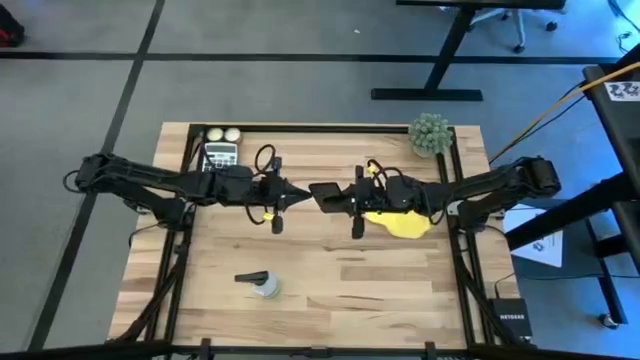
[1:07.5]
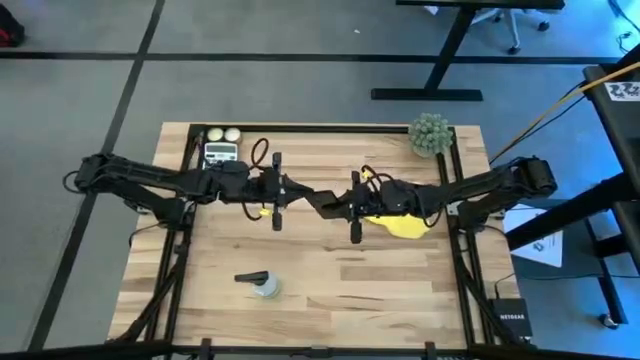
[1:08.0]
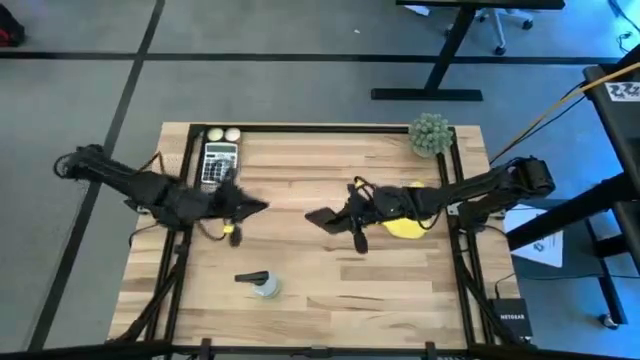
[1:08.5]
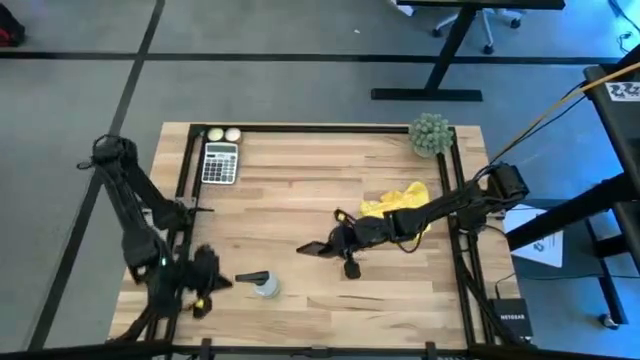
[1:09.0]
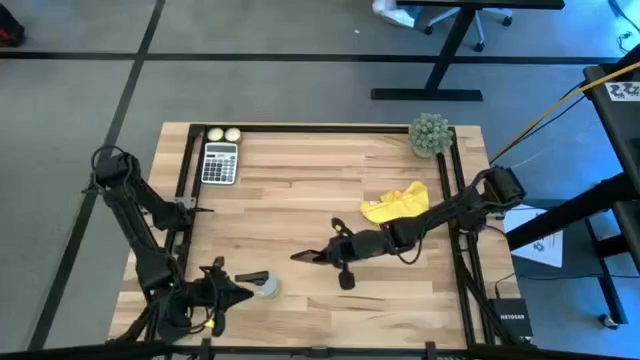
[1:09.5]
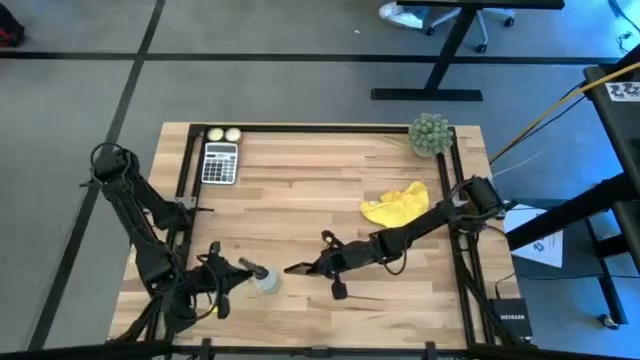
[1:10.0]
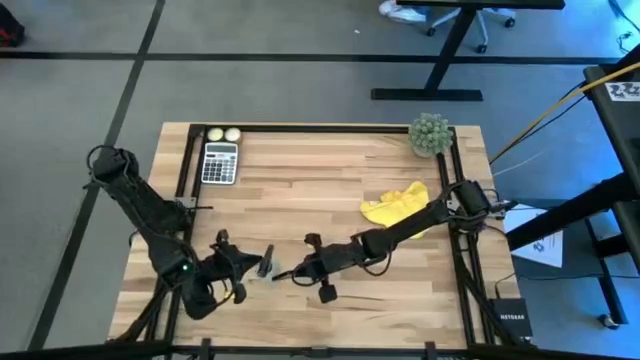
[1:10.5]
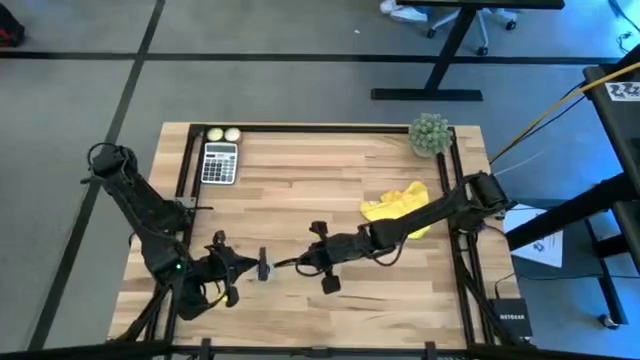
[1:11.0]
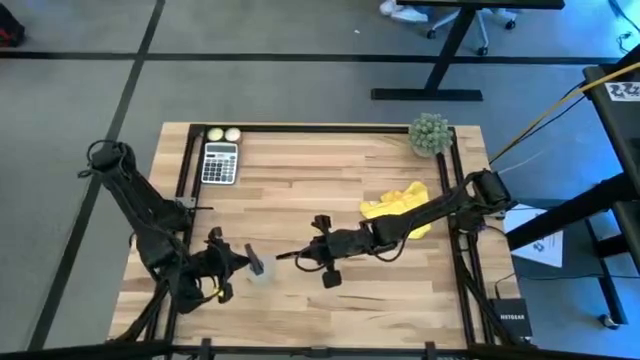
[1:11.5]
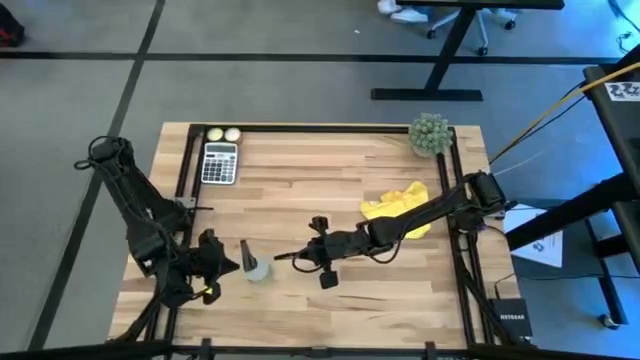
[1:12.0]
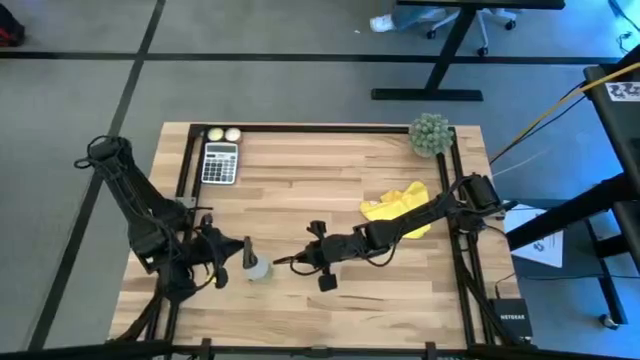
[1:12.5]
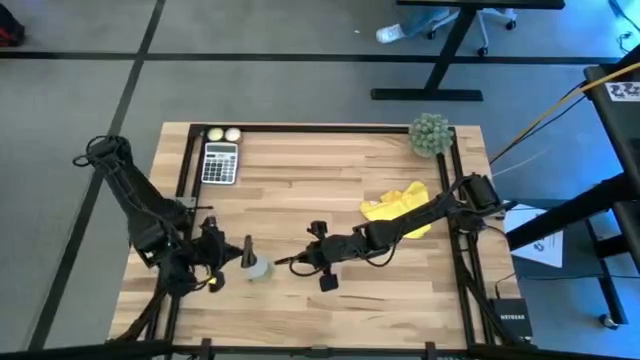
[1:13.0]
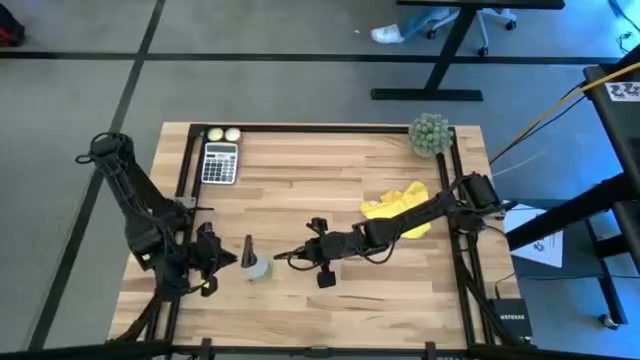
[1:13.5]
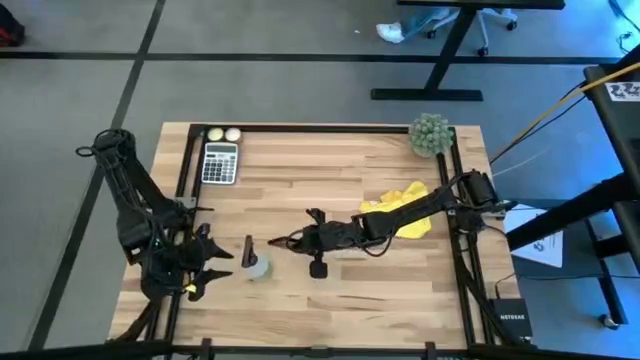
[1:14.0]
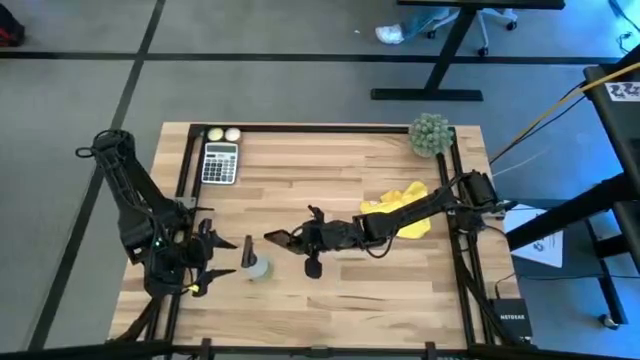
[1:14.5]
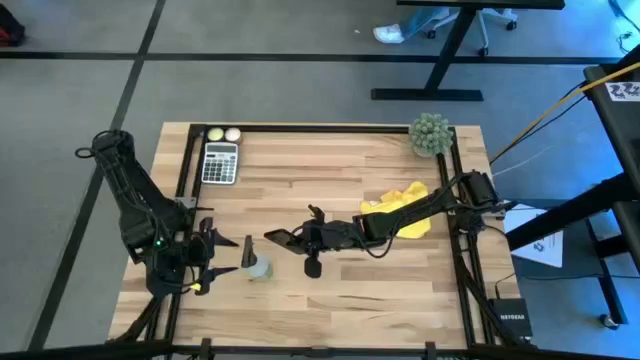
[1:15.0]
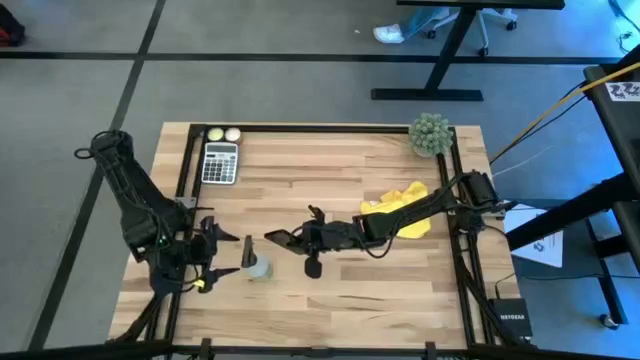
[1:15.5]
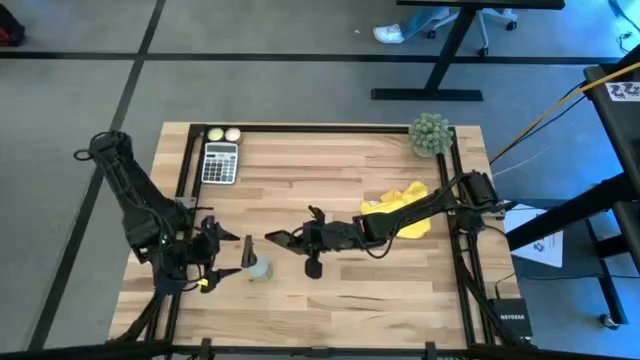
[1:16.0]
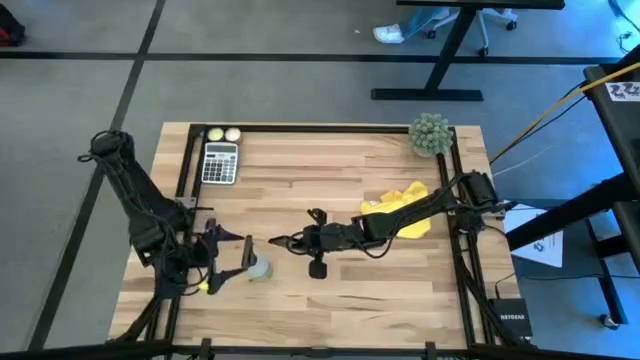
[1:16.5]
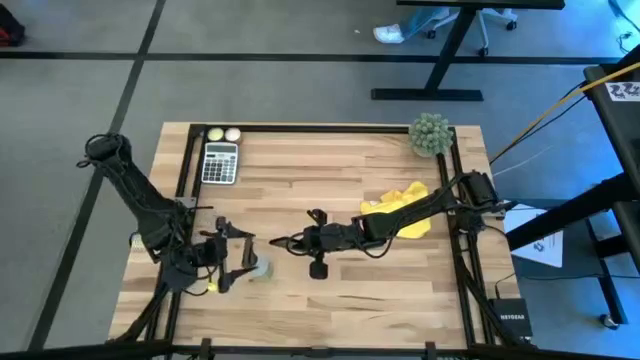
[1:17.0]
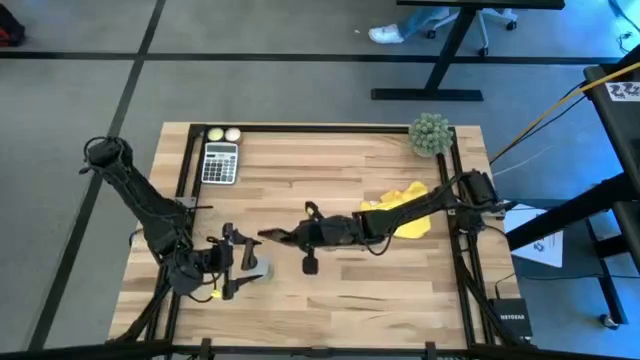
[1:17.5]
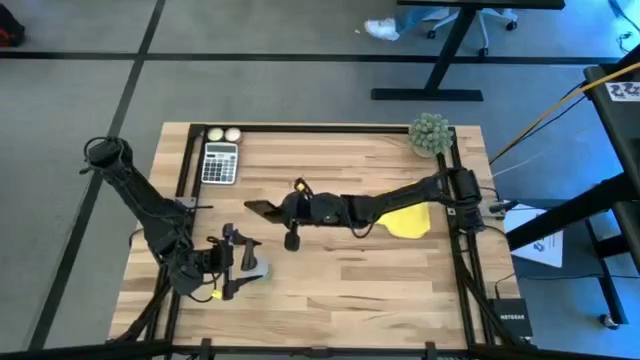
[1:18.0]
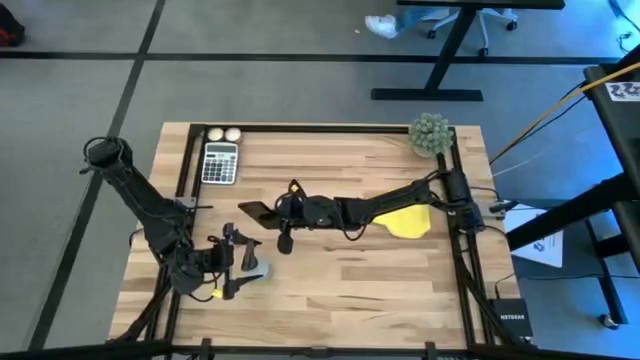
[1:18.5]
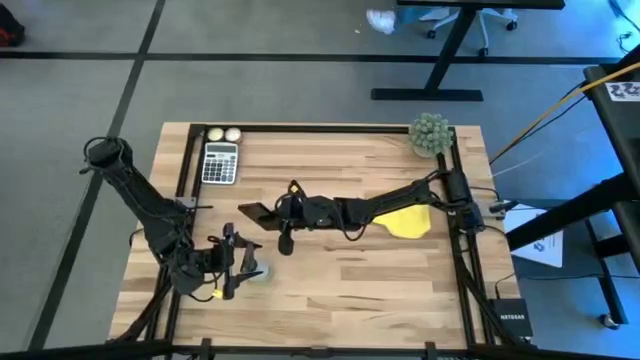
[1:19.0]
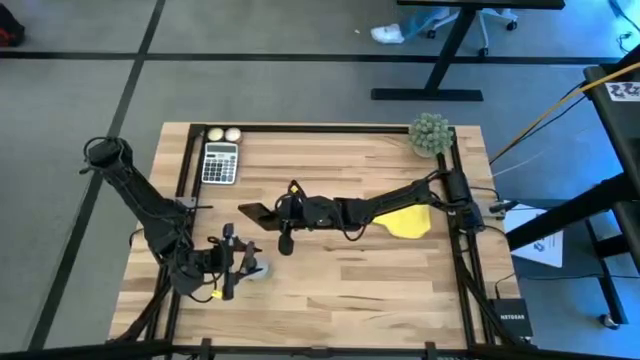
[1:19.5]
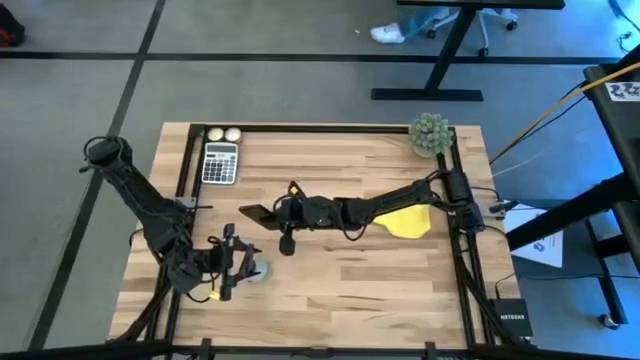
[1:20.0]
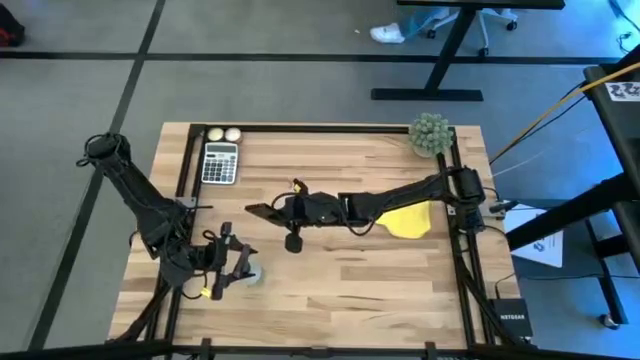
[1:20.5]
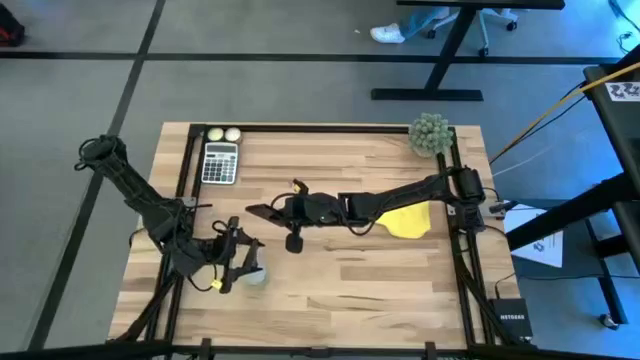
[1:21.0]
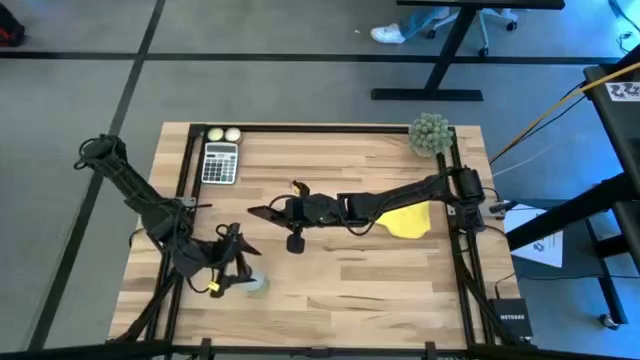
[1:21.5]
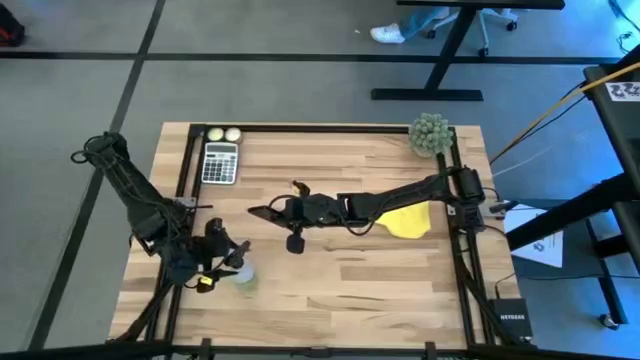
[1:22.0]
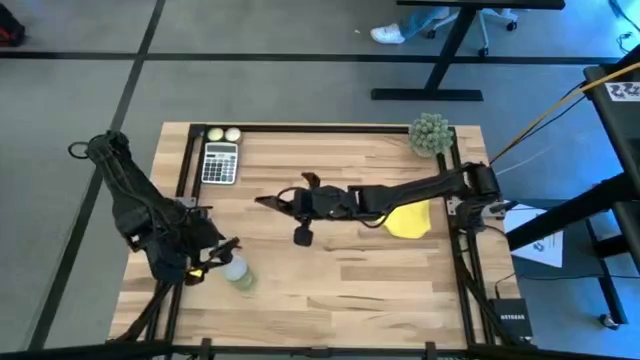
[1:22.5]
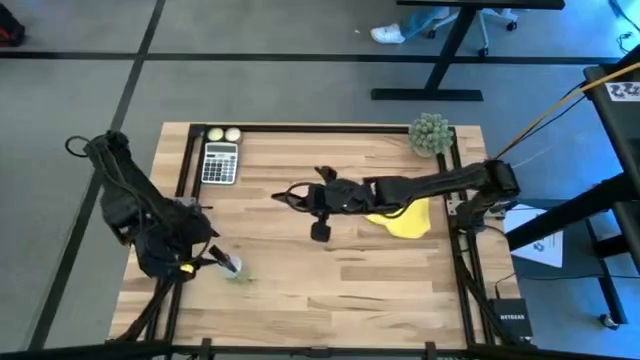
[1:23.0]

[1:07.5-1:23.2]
Task: Apply microfiber cloth
Spray the back of the cellphone using the spray bottle

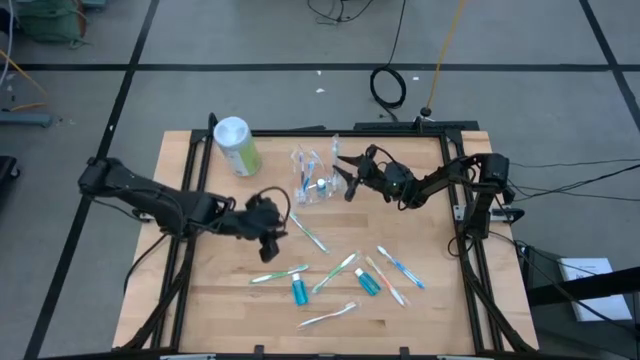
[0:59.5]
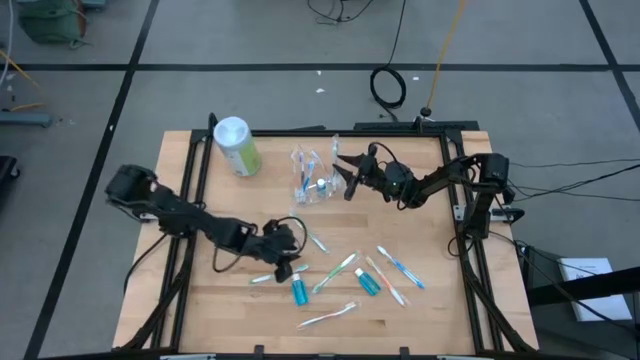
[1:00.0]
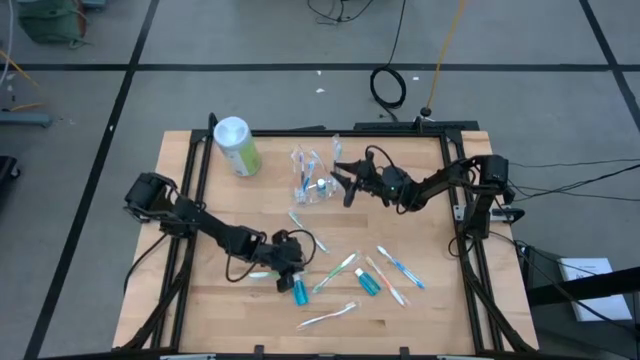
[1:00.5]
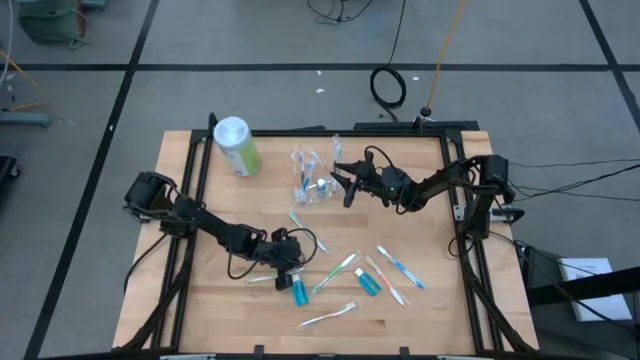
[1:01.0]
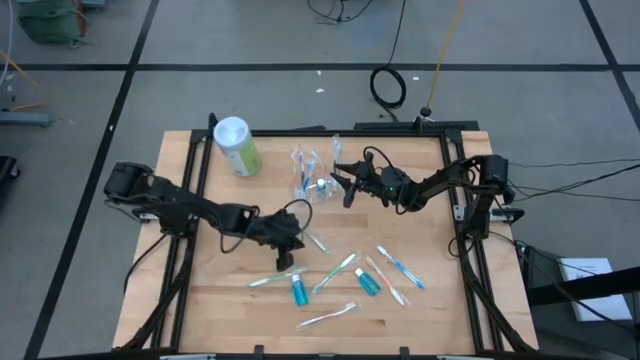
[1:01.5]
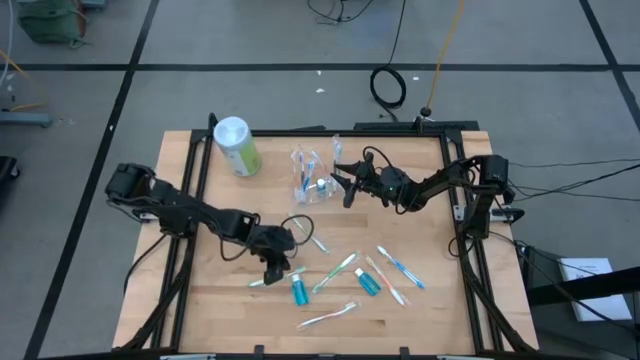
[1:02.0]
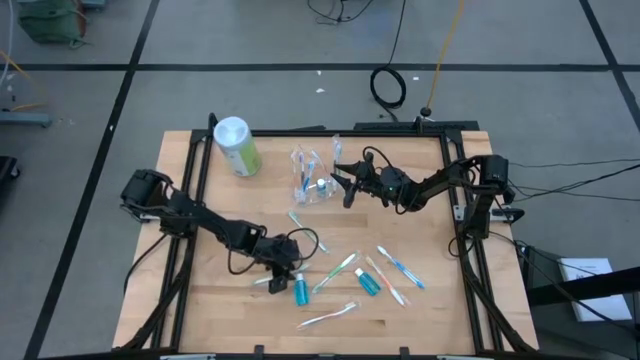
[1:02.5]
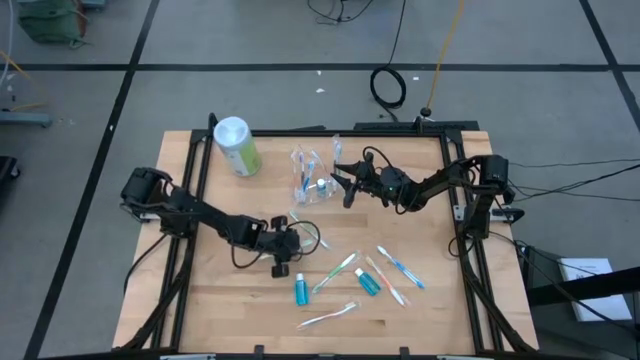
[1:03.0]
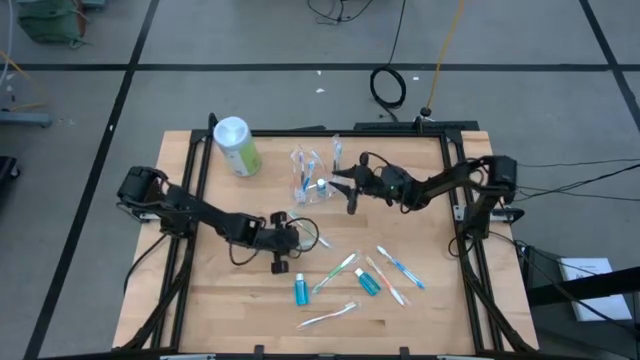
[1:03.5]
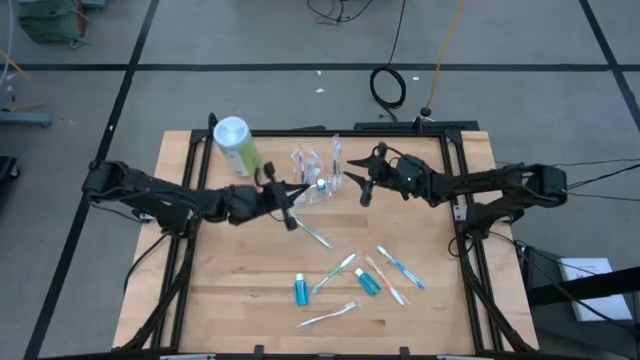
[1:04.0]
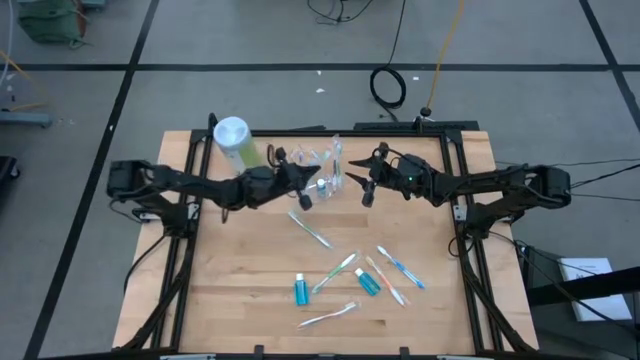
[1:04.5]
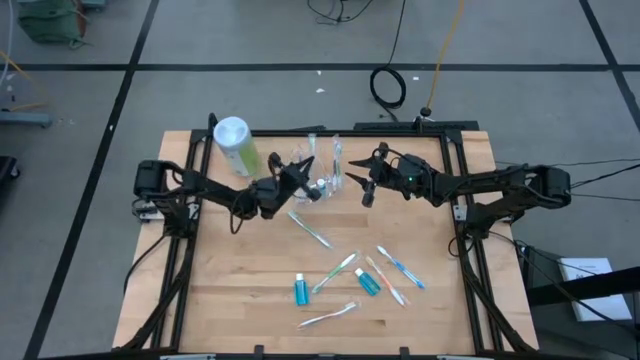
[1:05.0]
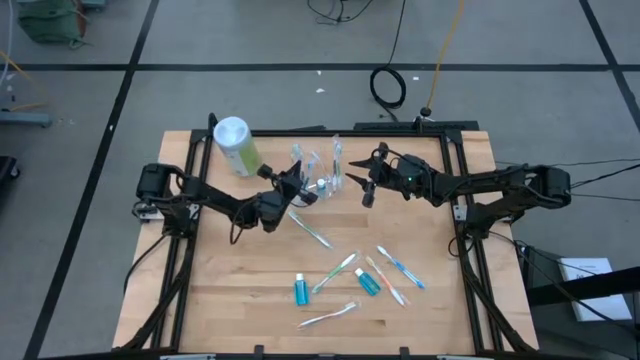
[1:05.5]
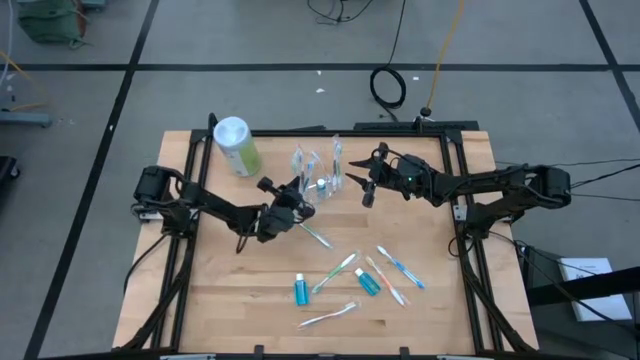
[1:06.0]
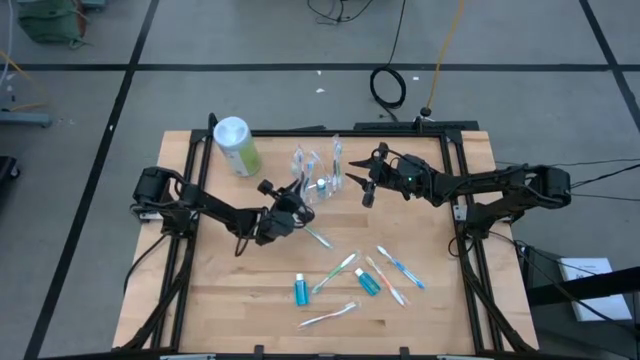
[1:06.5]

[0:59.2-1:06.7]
Task: Pick & Place toothbrushing station
Put the green toothbrush into the transparent organizer
